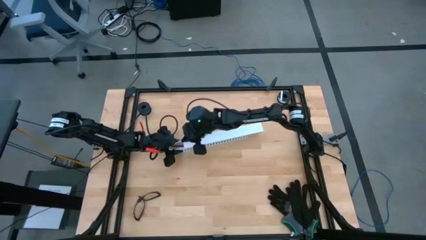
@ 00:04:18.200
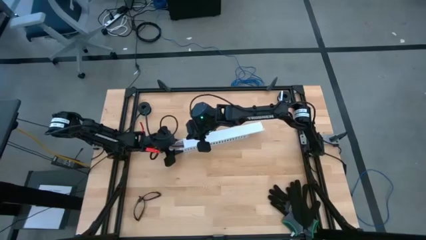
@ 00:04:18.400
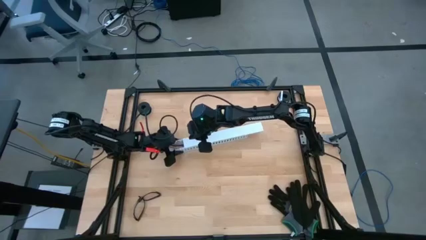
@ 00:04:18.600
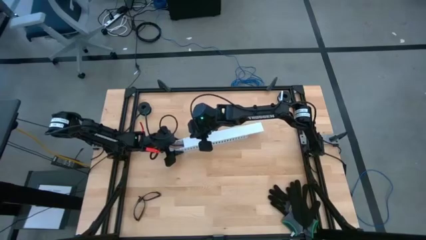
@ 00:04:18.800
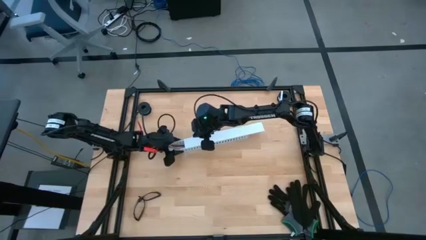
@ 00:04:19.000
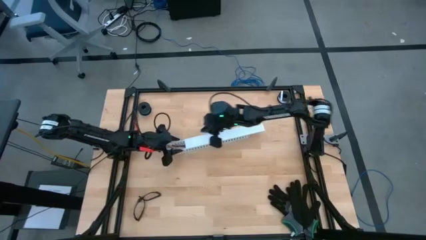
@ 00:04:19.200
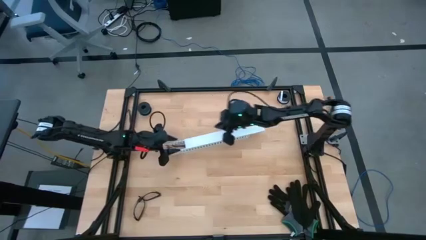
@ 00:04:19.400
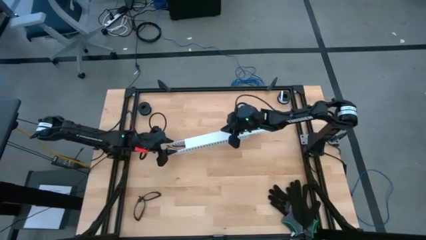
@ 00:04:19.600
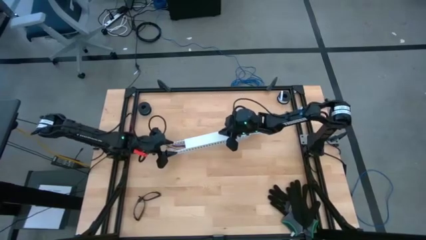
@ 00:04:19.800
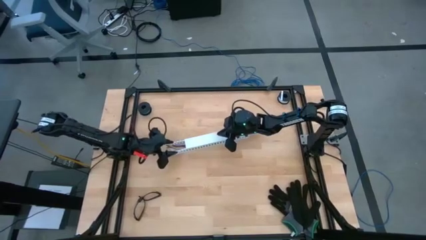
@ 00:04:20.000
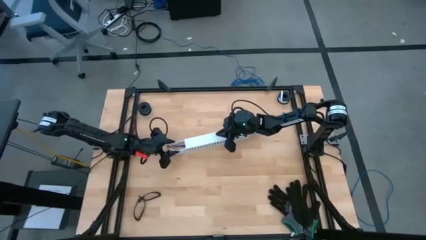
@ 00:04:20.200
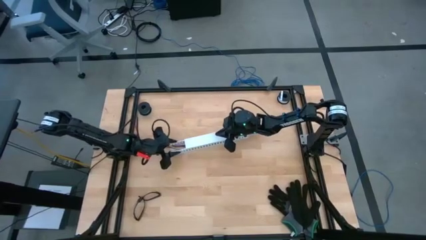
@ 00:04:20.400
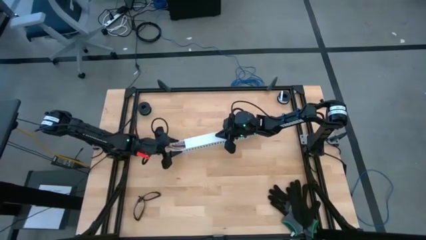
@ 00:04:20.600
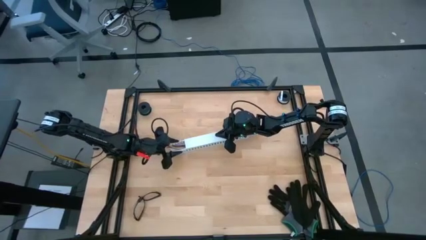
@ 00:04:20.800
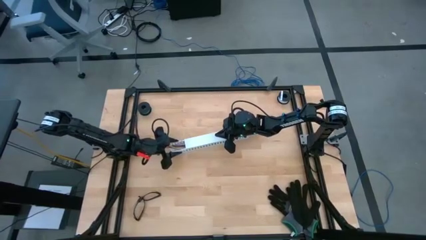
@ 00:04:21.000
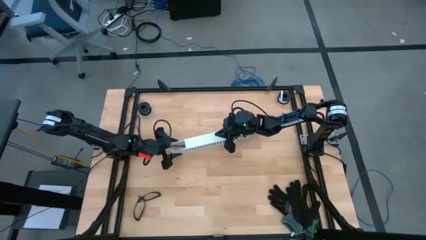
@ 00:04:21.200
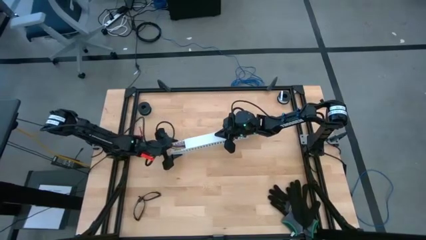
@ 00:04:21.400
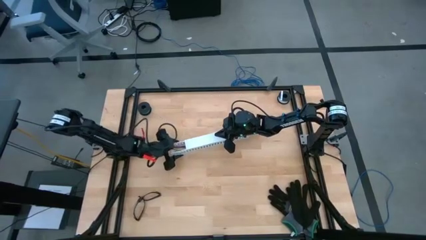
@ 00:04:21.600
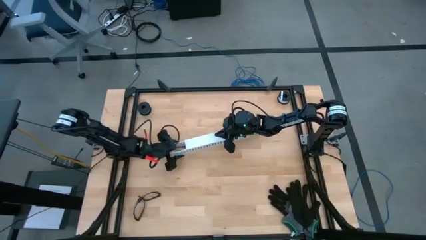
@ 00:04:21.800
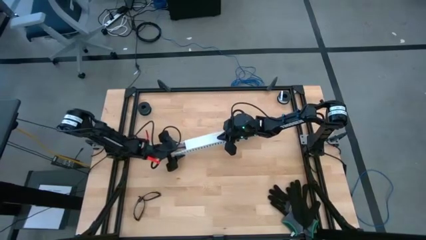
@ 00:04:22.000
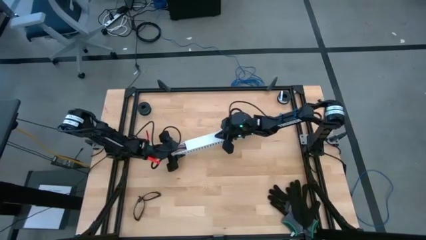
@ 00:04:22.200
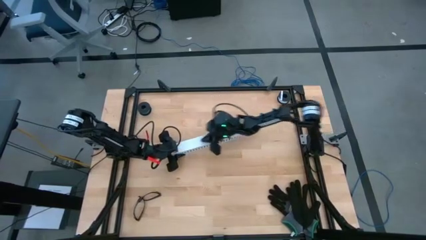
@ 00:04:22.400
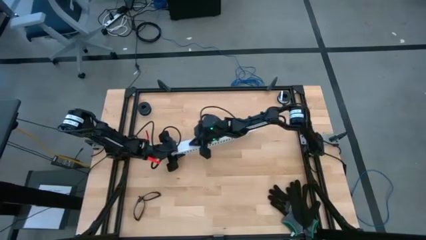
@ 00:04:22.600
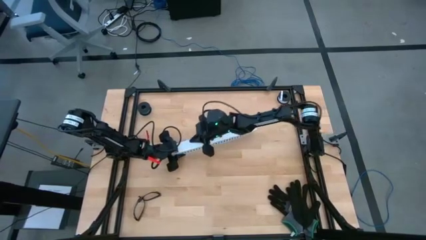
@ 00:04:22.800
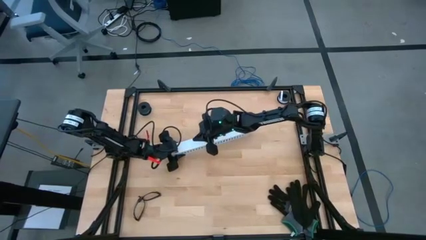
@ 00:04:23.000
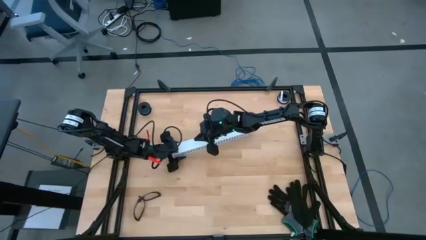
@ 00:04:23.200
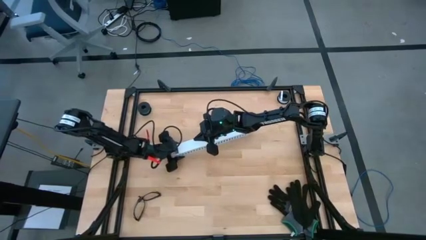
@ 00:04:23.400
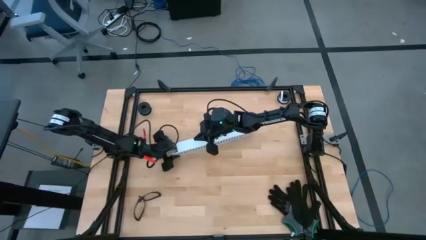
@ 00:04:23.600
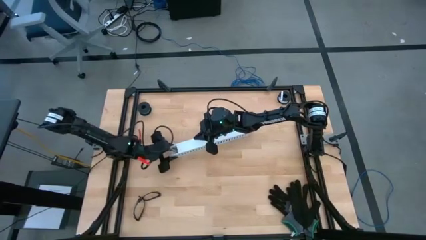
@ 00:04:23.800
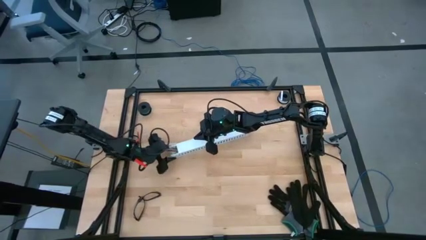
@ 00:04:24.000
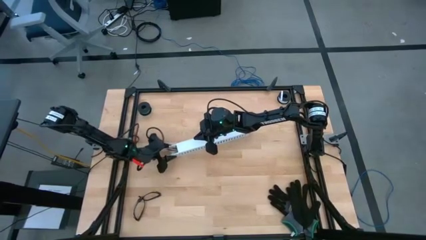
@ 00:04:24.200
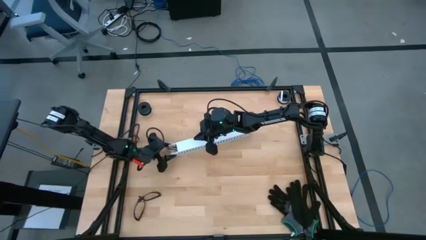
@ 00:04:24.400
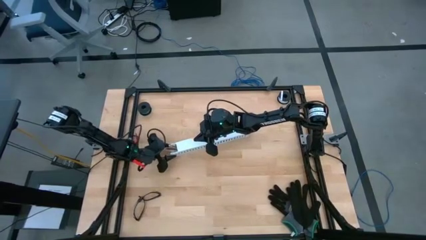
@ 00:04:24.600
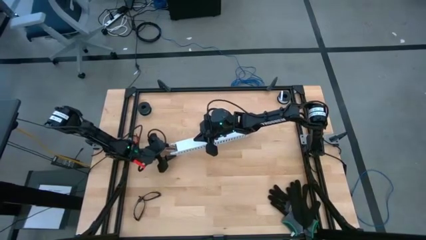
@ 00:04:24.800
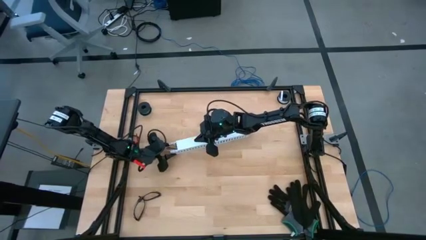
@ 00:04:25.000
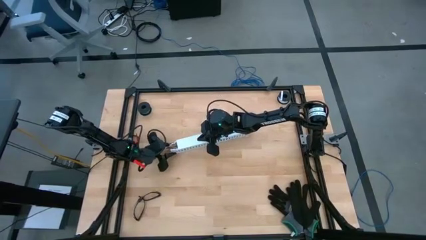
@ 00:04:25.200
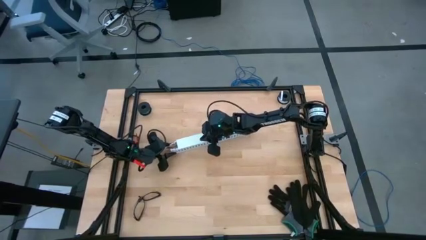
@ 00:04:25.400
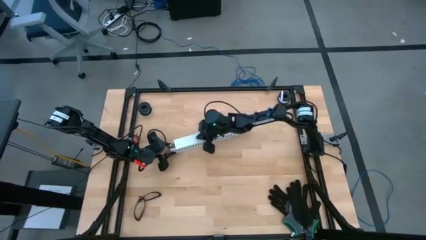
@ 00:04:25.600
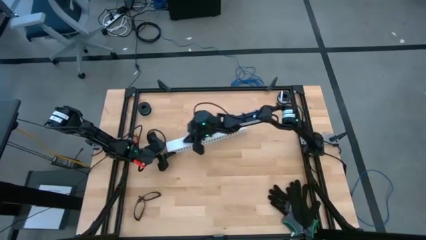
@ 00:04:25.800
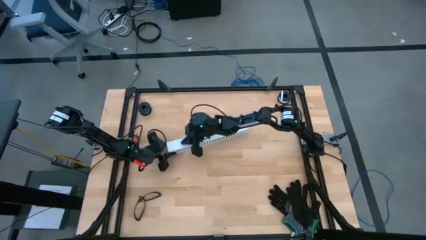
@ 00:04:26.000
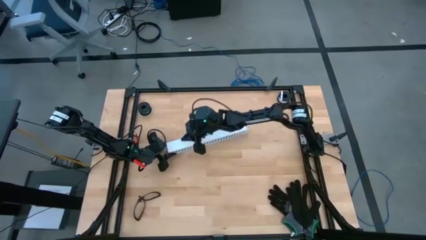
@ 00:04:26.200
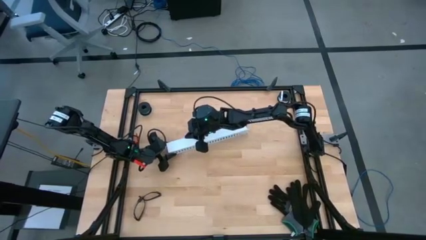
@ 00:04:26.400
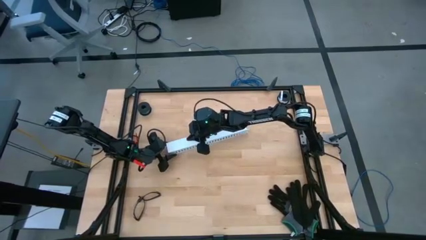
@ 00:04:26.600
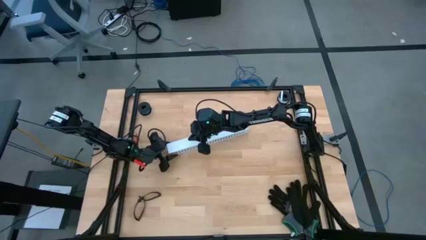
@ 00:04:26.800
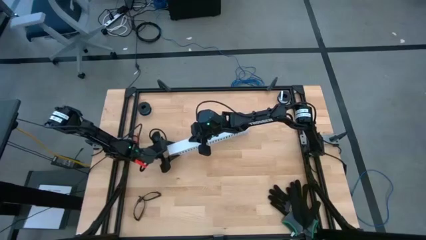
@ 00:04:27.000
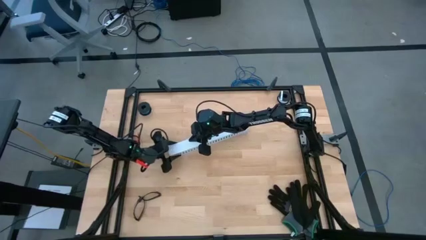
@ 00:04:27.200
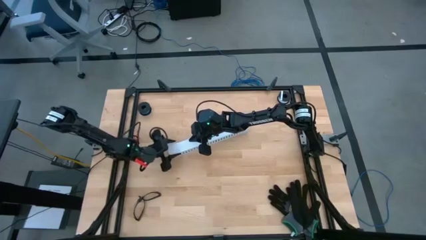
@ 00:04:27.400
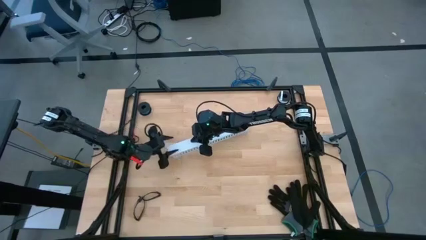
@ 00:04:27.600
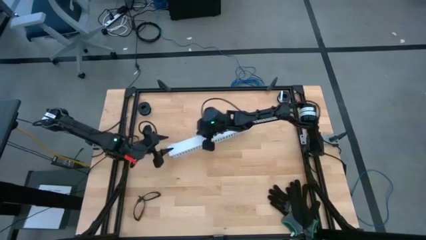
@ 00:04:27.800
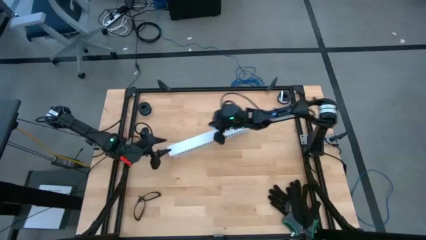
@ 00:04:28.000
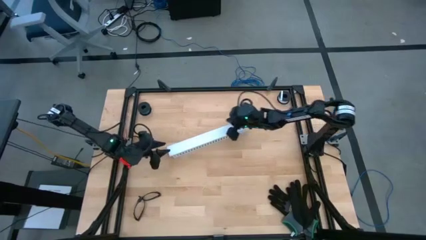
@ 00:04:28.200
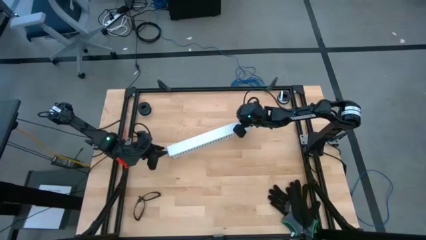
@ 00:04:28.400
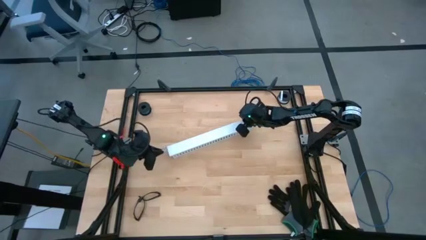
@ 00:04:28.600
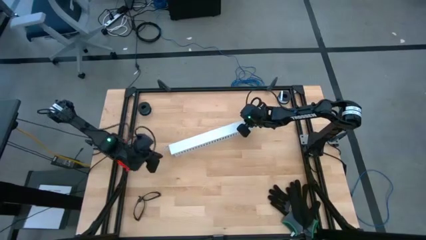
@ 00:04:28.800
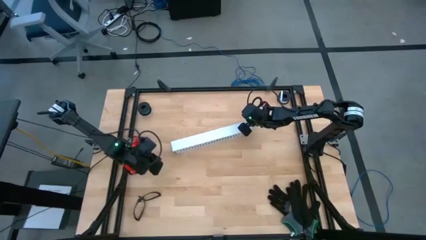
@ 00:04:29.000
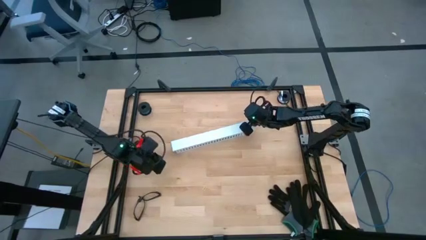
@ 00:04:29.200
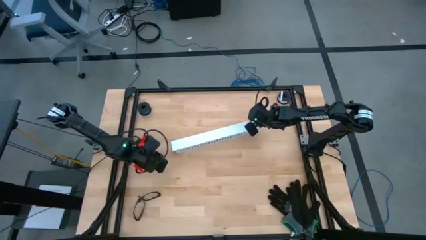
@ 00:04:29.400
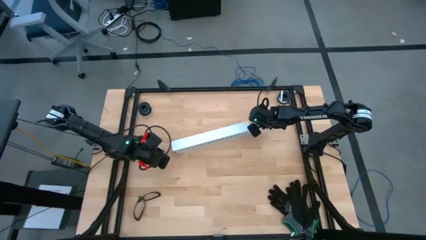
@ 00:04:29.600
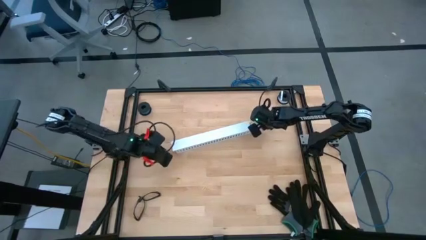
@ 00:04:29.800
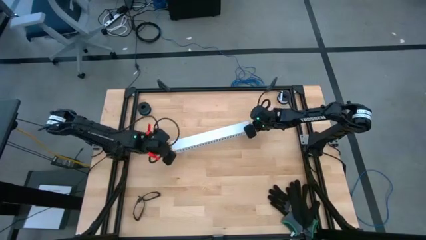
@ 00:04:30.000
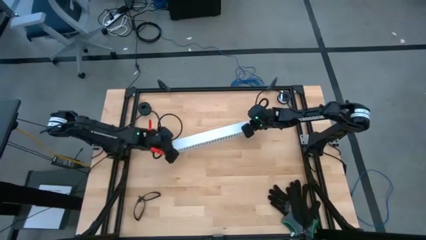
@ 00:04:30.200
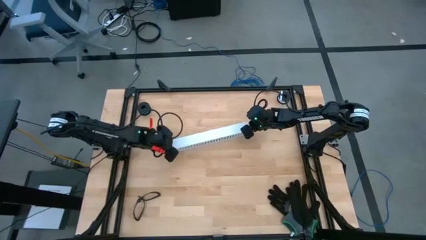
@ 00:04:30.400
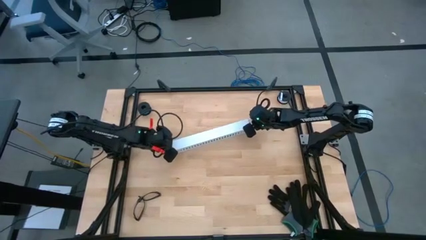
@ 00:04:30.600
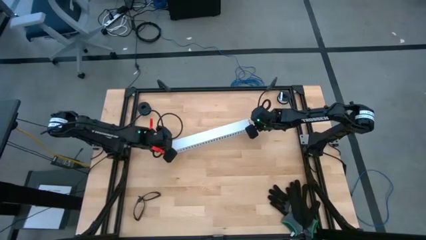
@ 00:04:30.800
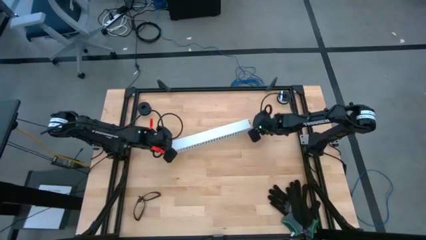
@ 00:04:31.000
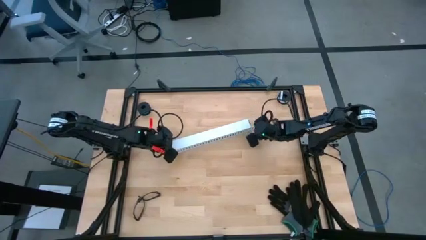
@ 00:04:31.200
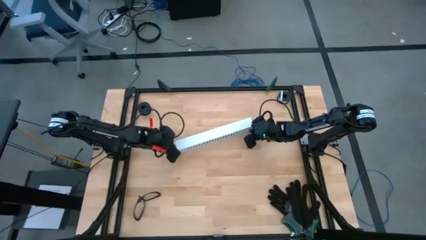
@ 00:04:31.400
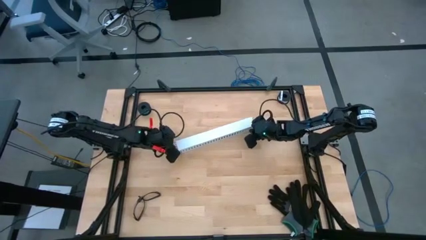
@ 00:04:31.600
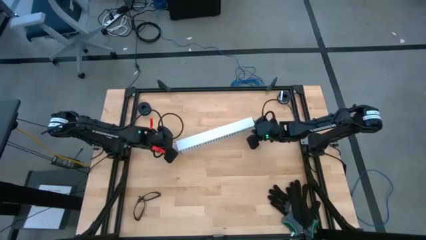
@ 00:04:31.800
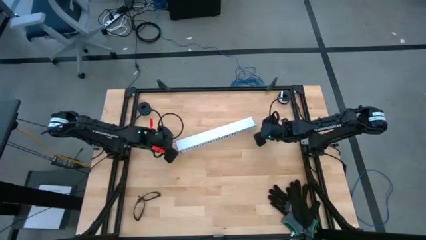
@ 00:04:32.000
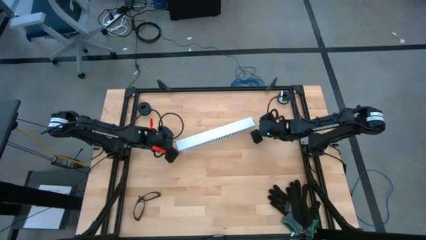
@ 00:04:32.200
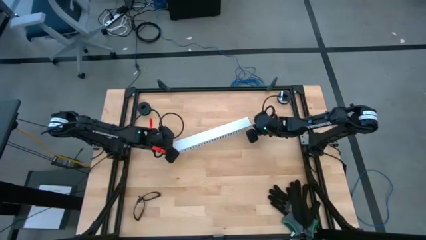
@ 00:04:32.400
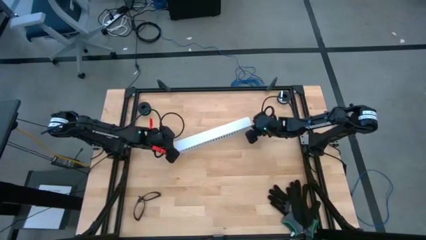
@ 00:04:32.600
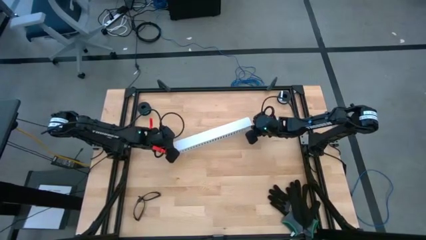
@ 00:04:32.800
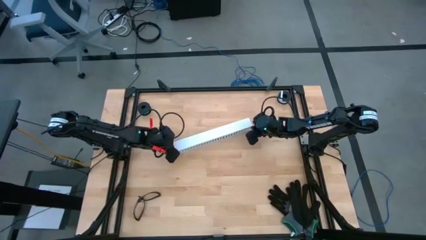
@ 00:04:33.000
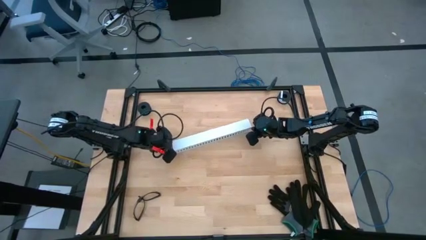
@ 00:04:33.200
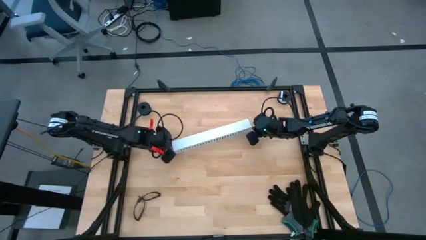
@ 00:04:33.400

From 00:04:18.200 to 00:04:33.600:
Task: Ziptie cables
Close the white cable duct using the cover

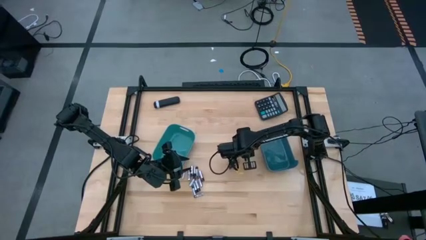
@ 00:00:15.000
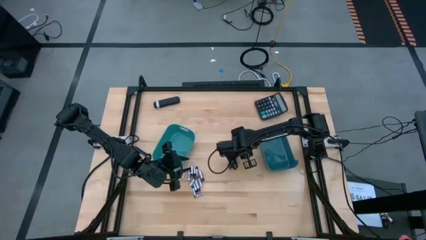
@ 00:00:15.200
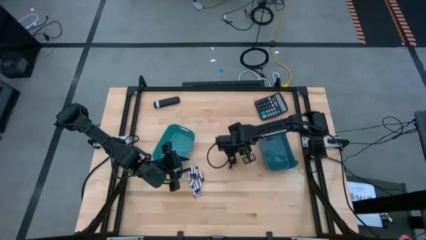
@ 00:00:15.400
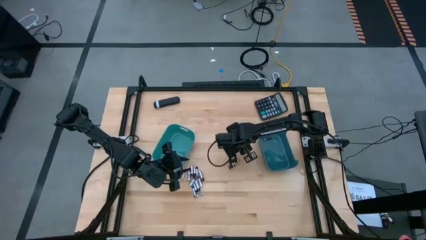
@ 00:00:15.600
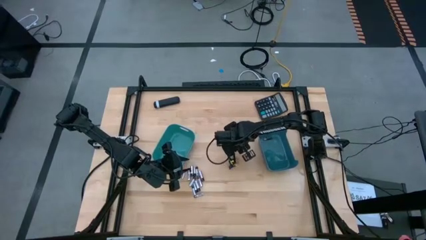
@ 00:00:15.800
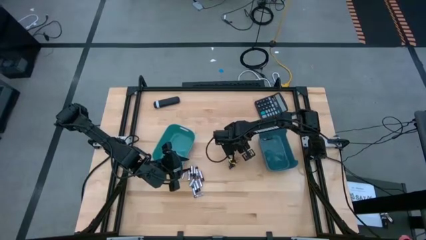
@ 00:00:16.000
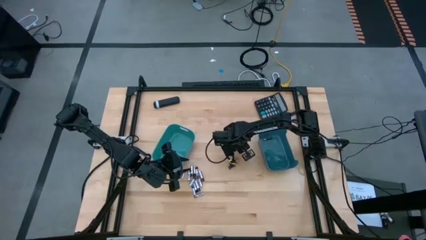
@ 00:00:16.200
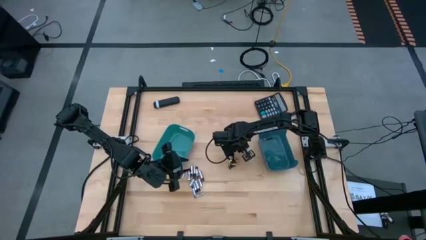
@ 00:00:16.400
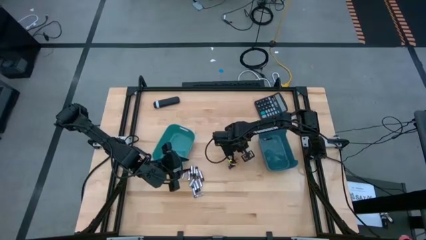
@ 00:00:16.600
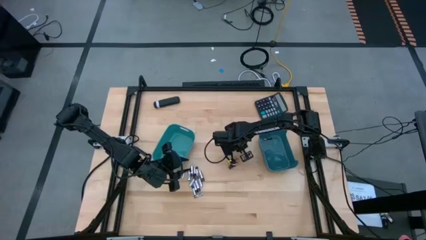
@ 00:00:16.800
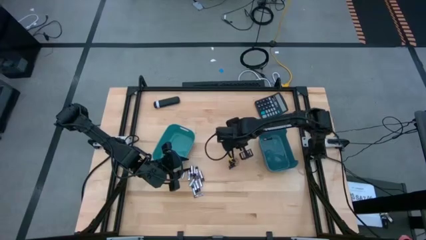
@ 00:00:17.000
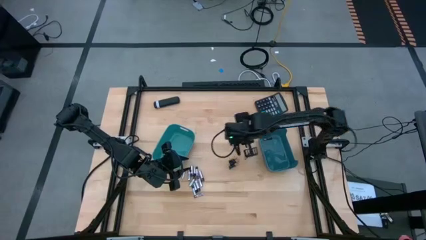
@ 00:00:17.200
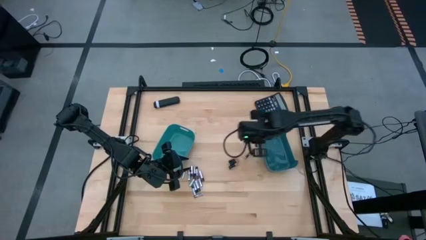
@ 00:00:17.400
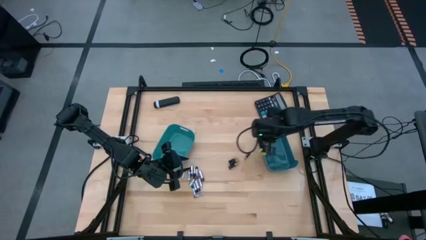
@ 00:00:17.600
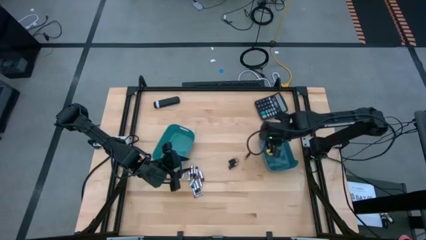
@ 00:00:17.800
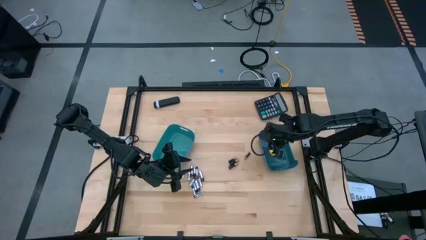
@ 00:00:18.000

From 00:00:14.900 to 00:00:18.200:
Task: Sort batteries
Put the black battery into the blue bin
